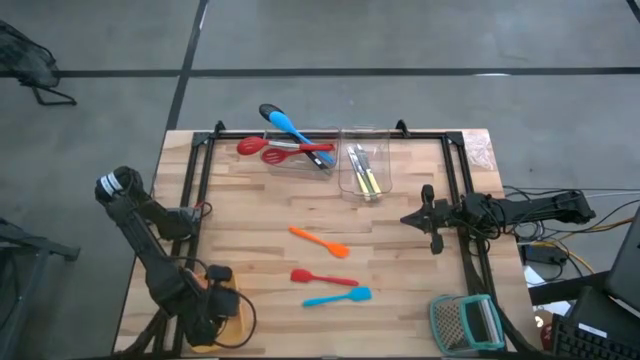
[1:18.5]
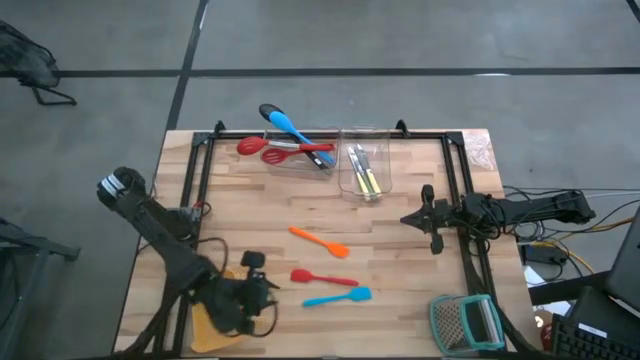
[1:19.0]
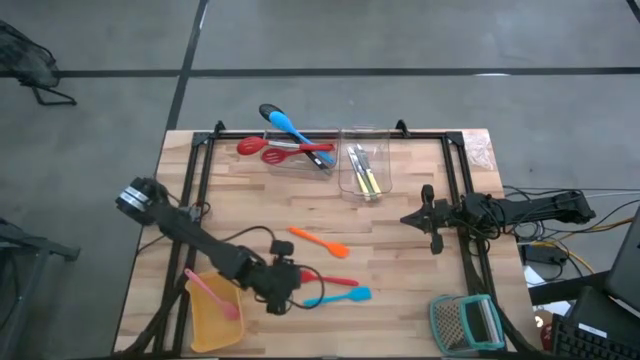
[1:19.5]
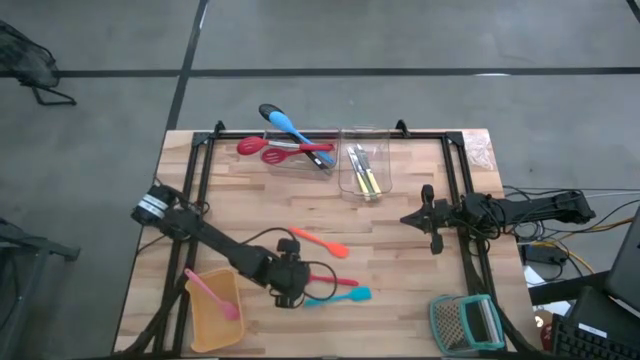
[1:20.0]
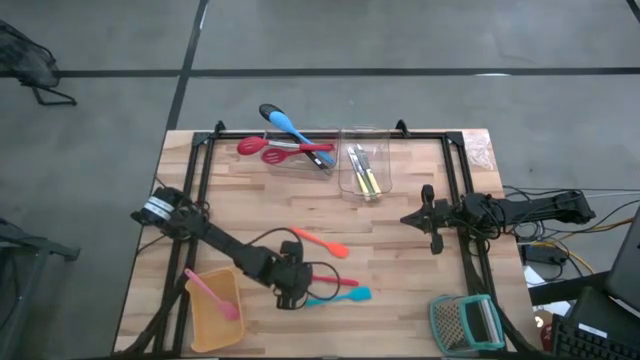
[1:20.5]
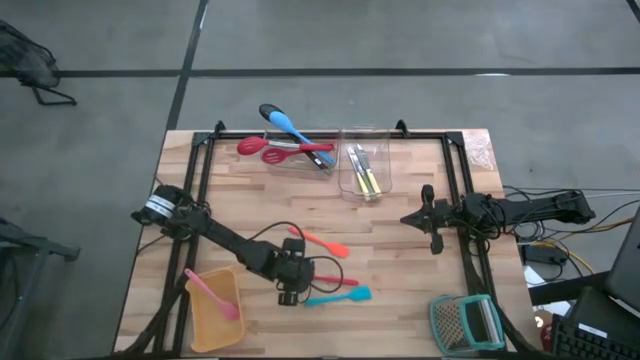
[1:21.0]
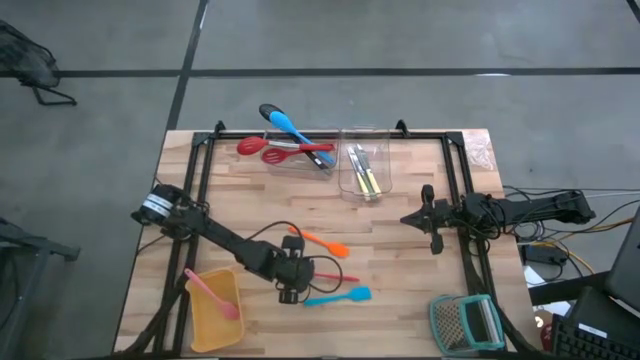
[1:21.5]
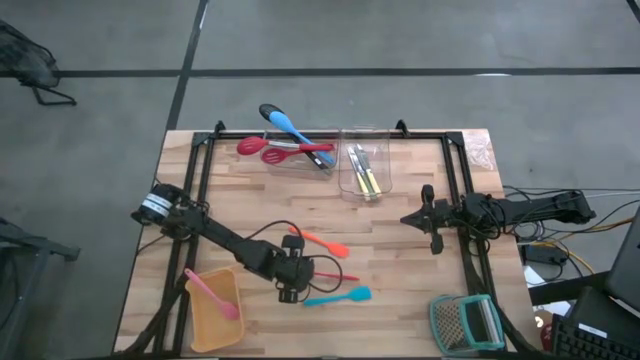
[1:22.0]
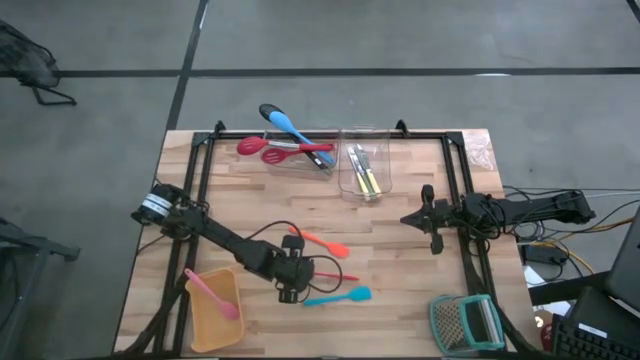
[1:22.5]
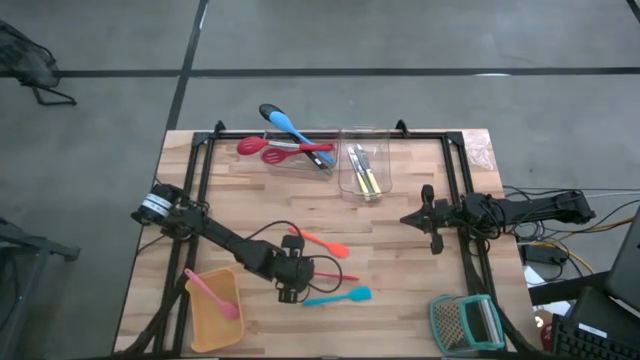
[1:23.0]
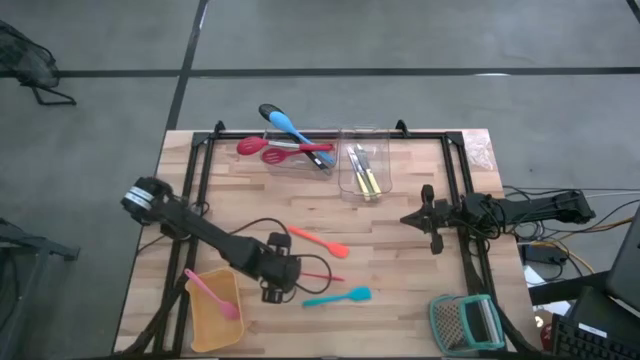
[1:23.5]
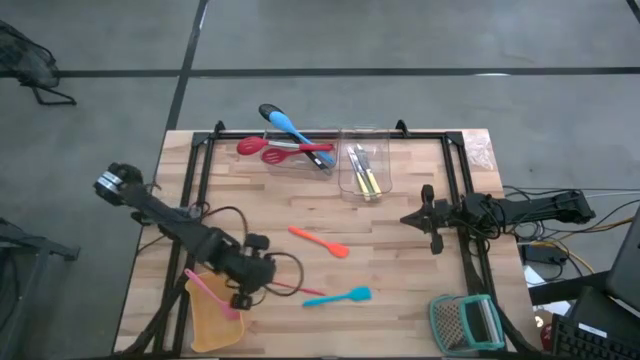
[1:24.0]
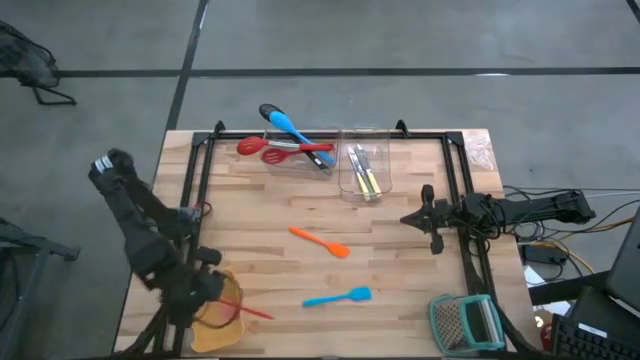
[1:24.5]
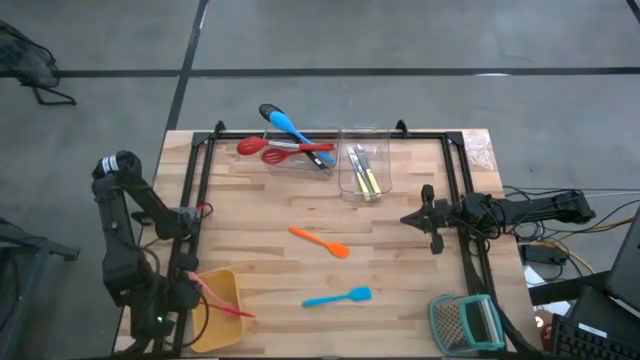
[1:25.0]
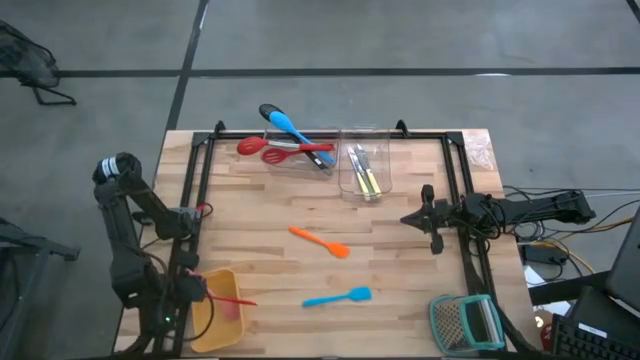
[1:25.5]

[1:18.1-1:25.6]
Task: Pick & Place Kitchen Items
Put the red spatula into the yellow bin

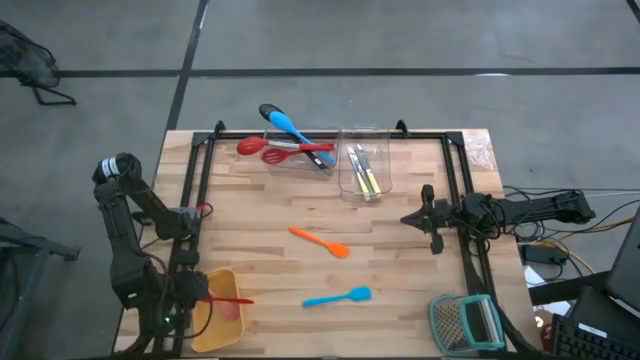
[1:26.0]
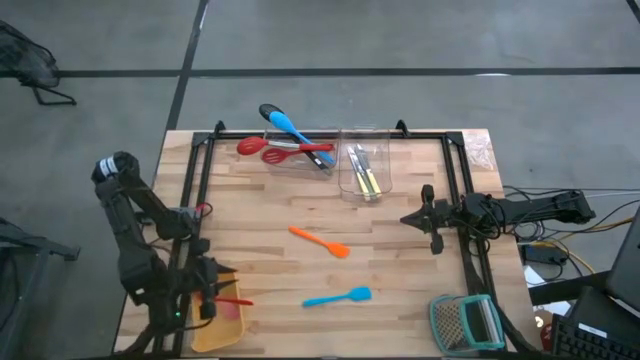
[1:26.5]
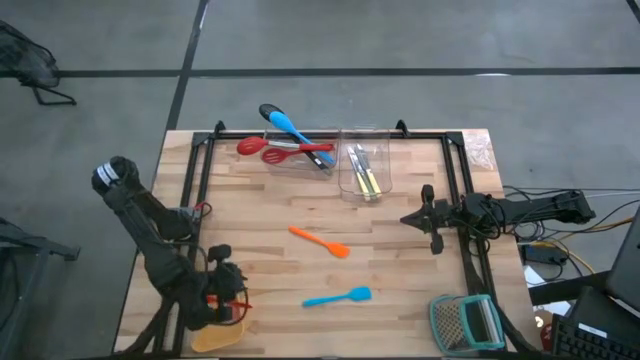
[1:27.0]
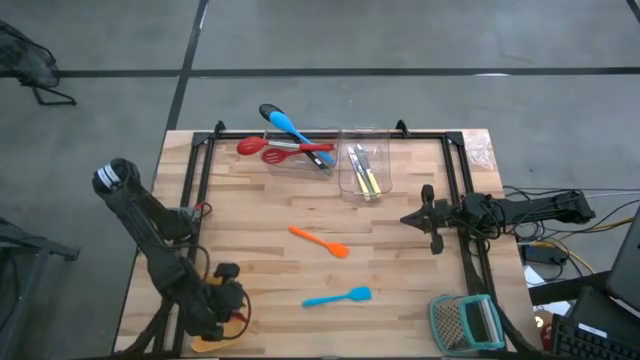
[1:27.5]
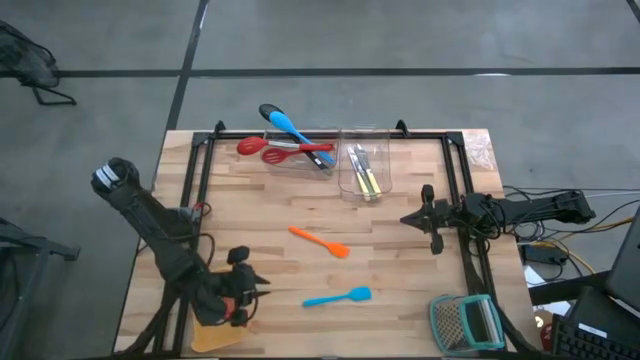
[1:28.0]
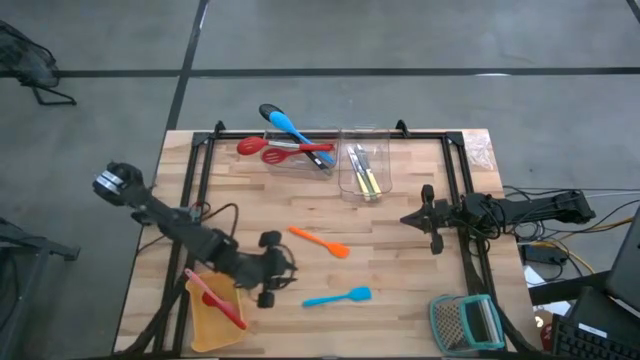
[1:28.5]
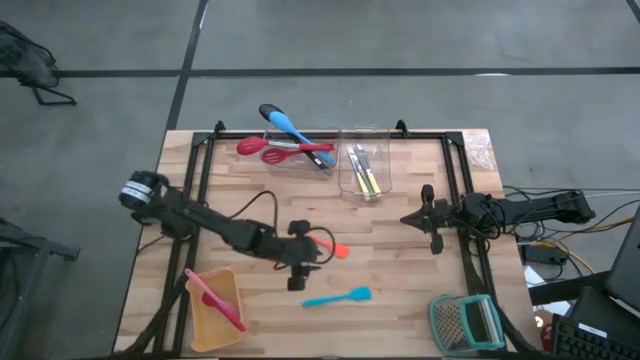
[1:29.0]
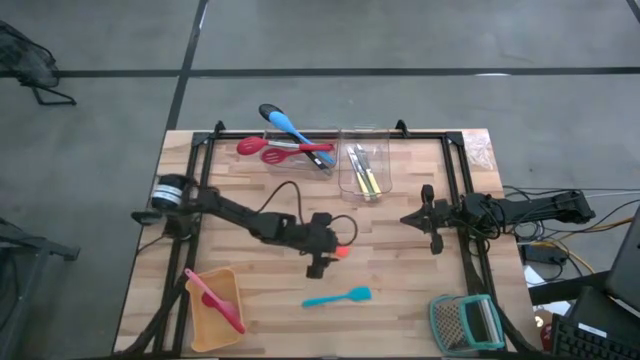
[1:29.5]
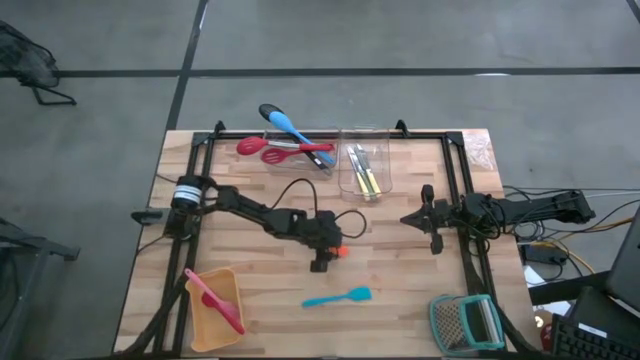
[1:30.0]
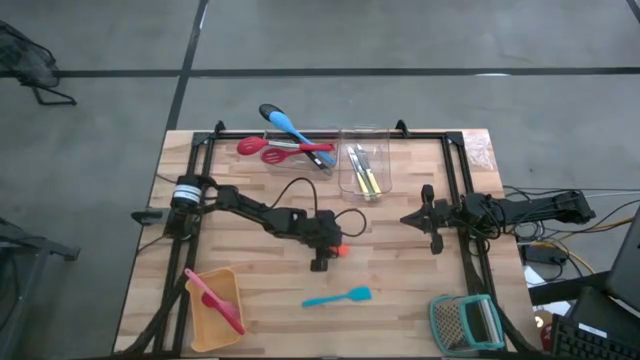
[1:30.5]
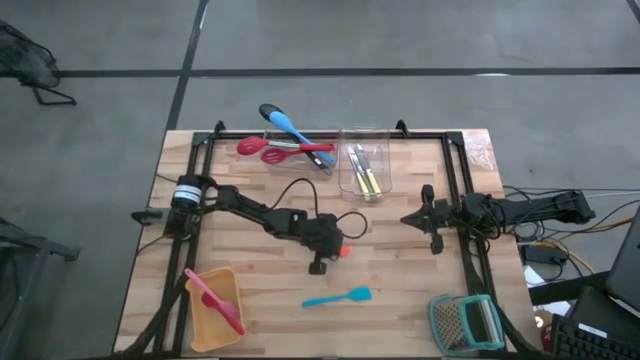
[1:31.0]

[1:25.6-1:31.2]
Put the orange spatula into the yellow bin

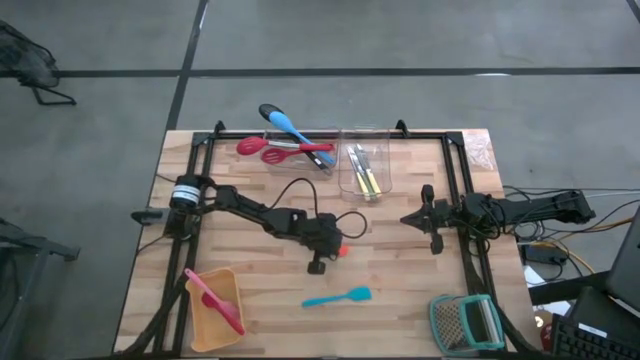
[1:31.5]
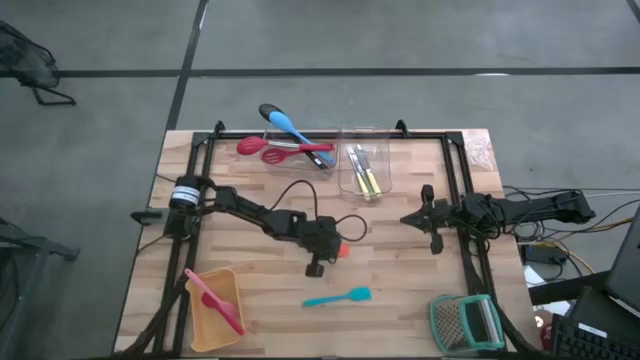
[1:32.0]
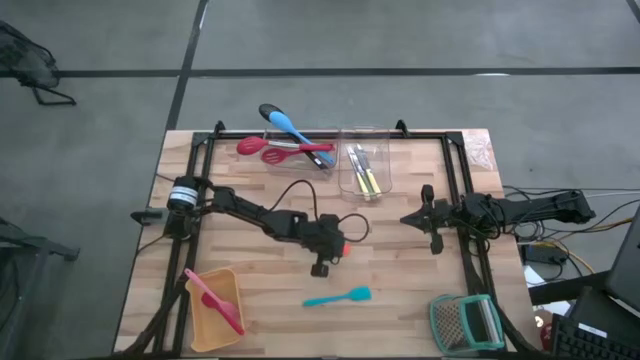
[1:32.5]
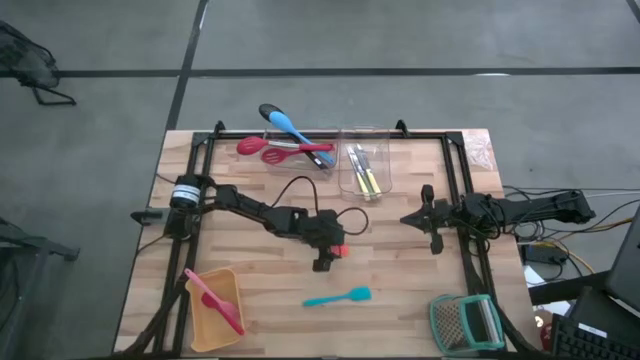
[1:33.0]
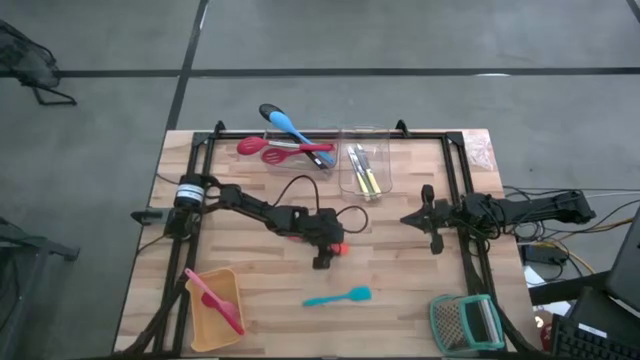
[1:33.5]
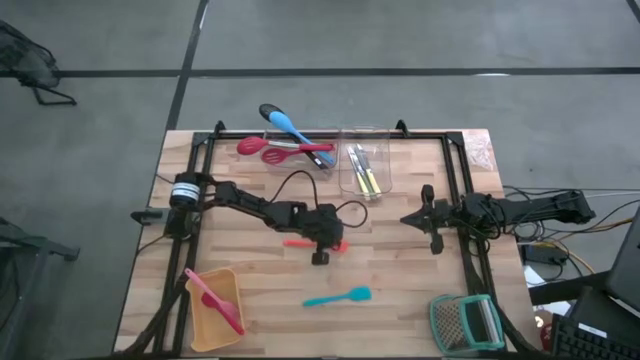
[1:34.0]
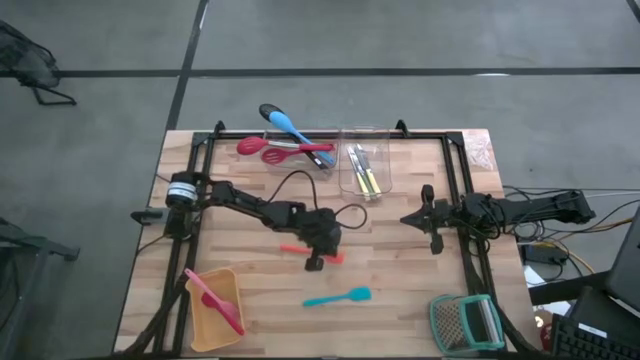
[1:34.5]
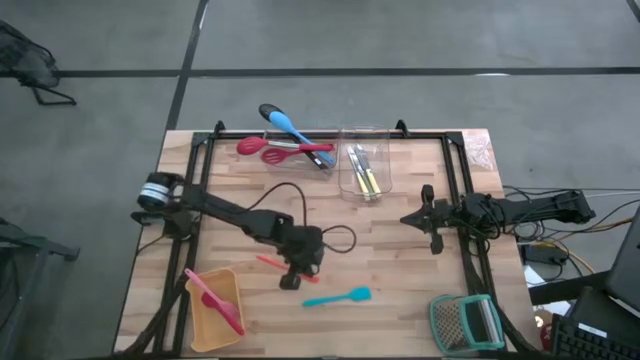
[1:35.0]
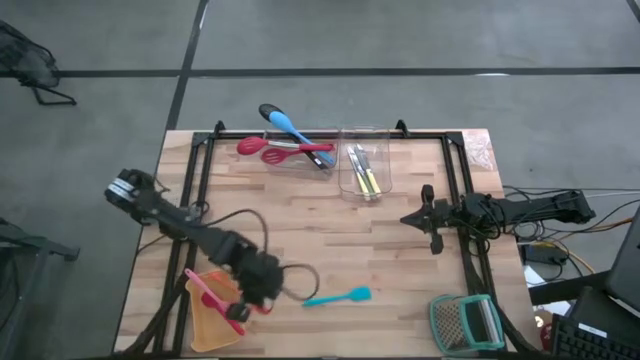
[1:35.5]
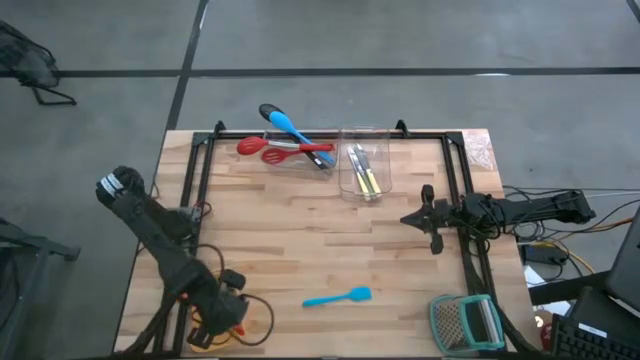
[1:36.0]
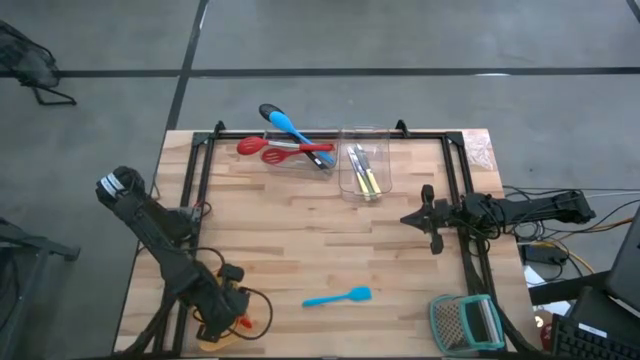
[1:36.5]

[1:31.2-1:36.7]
Put the orange spatula into the yellow bin

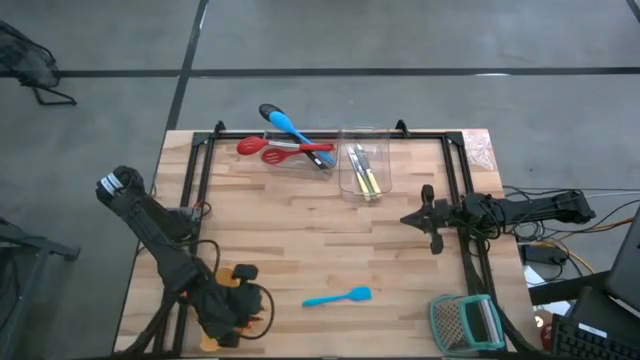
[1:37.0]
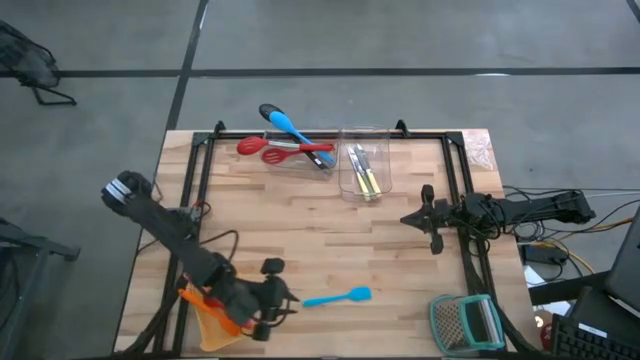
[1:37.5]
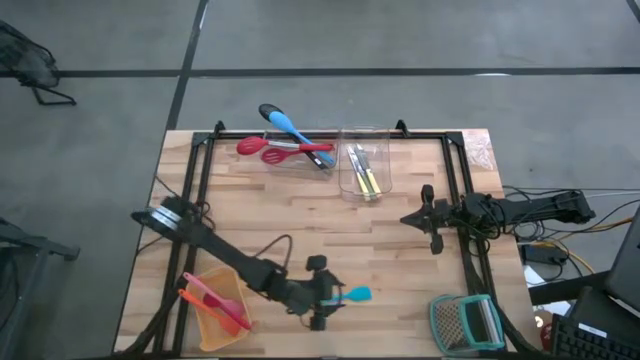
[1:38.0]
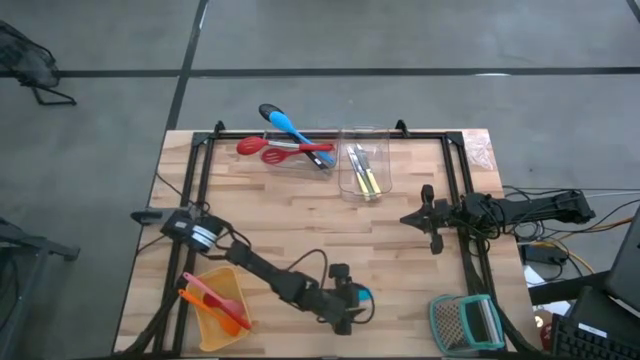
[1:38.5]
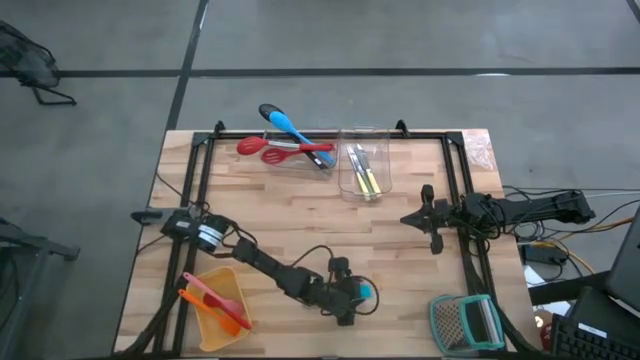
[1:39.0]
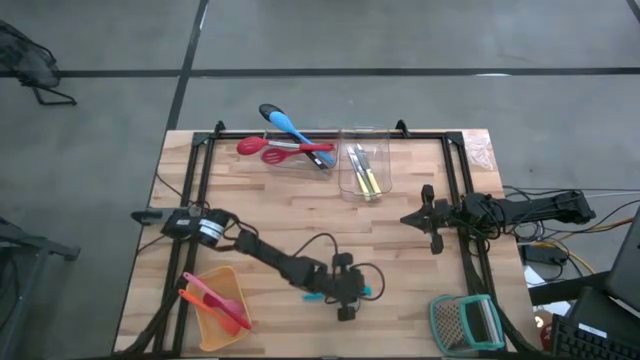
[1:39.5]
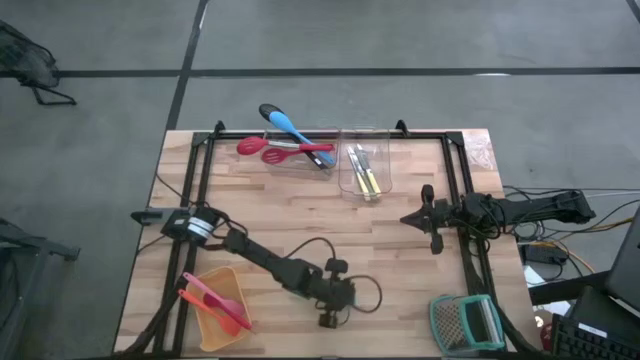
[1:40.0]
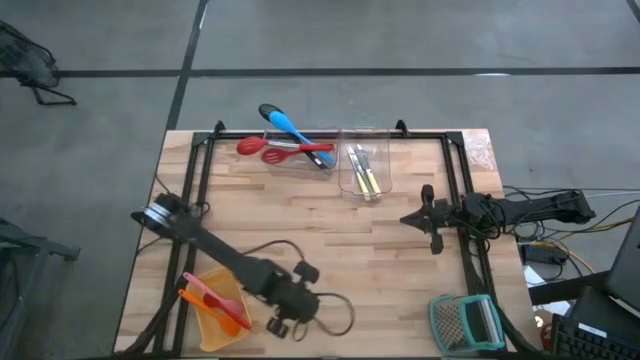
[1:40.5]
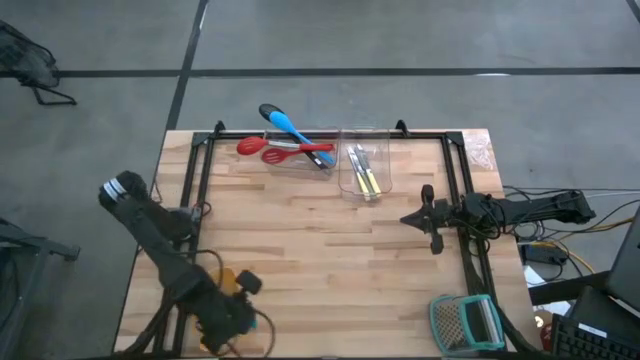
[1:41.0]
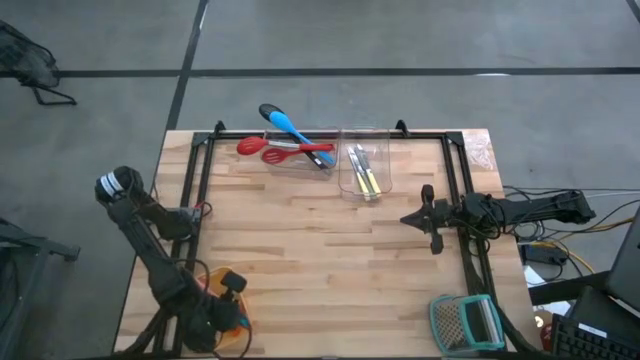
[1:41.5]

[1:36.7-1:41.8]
Put the blue spatula into the yellow bin
